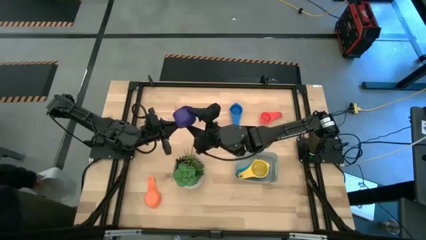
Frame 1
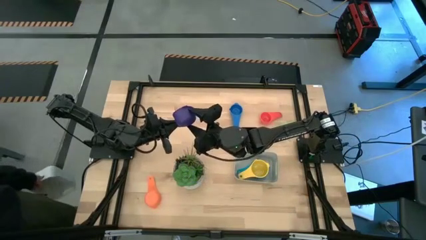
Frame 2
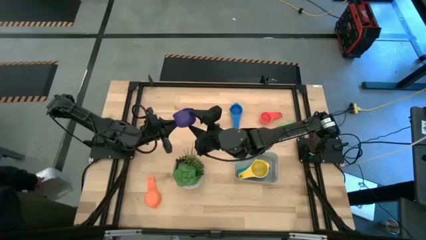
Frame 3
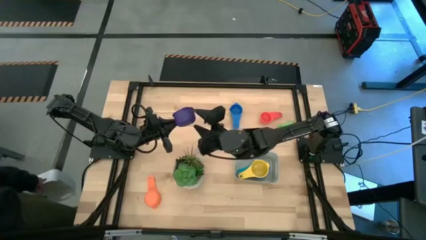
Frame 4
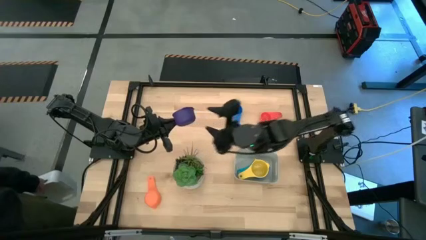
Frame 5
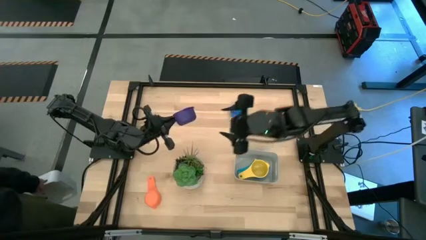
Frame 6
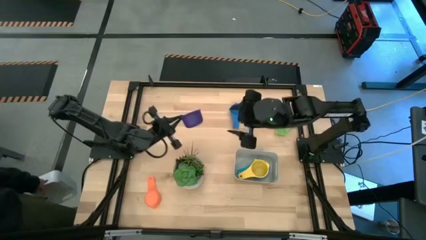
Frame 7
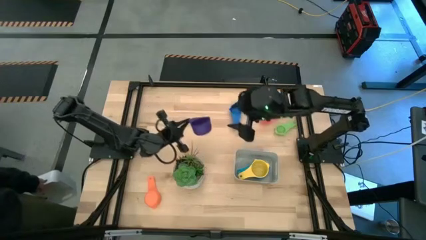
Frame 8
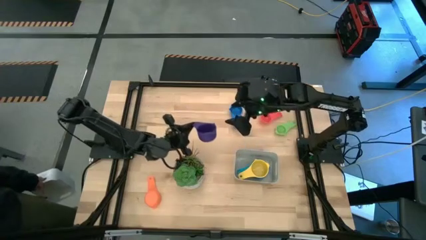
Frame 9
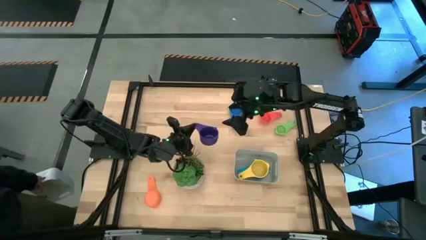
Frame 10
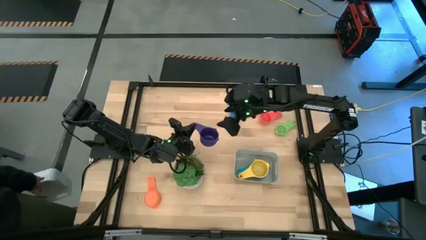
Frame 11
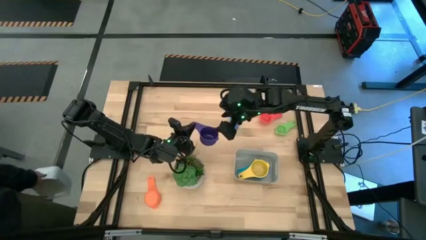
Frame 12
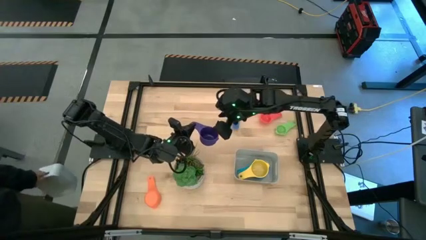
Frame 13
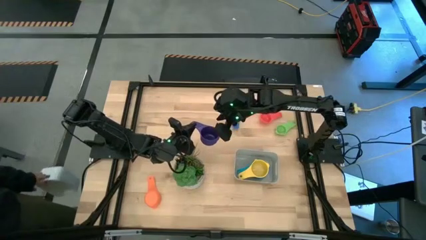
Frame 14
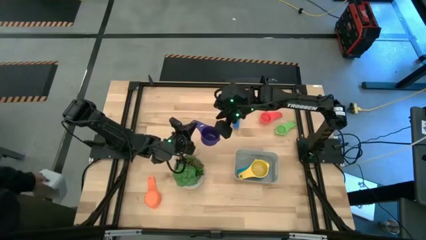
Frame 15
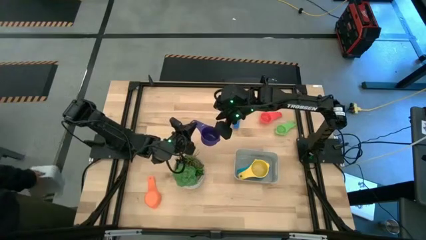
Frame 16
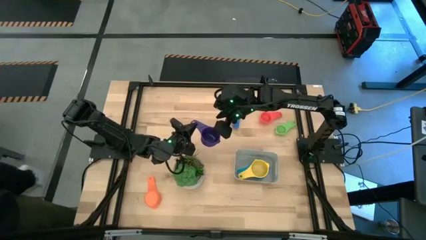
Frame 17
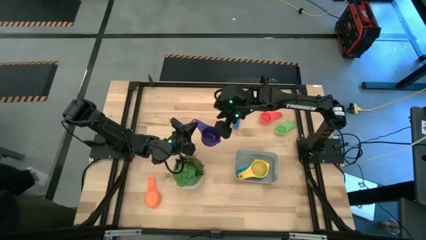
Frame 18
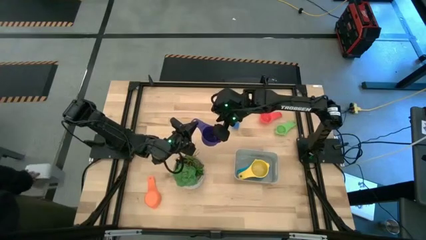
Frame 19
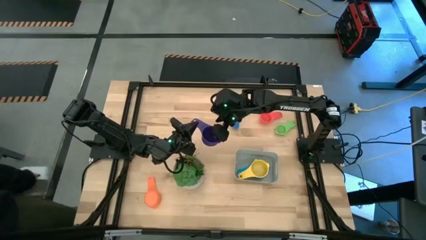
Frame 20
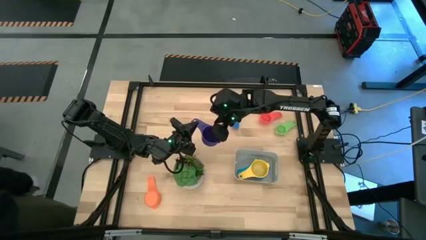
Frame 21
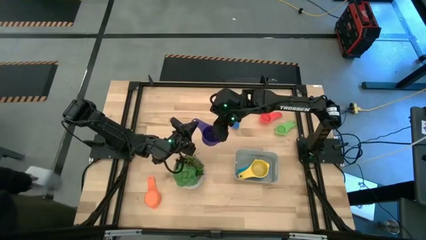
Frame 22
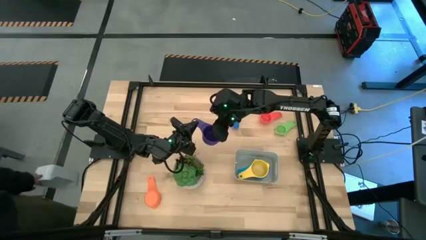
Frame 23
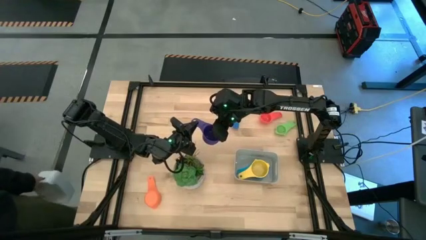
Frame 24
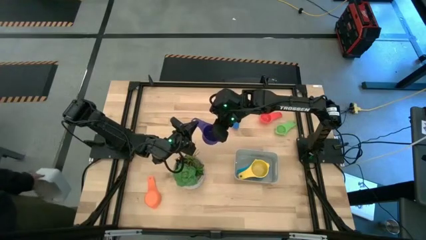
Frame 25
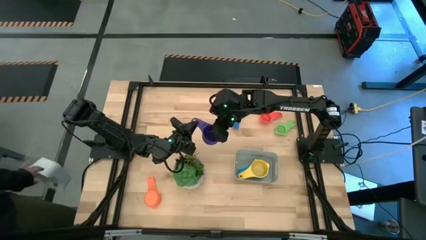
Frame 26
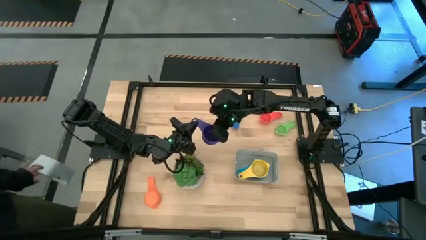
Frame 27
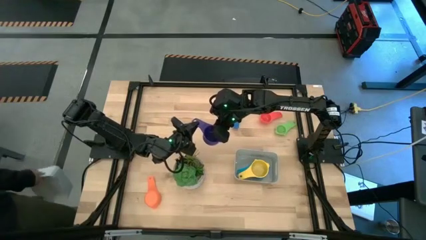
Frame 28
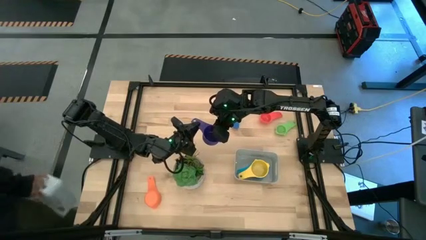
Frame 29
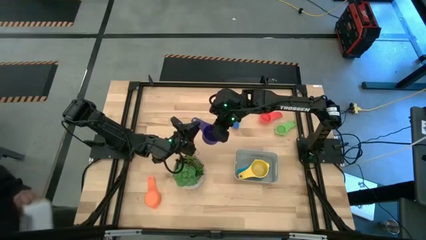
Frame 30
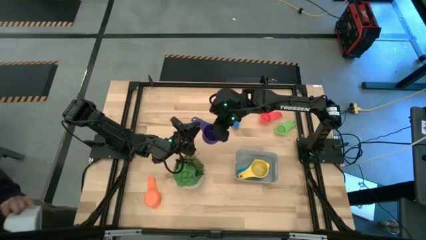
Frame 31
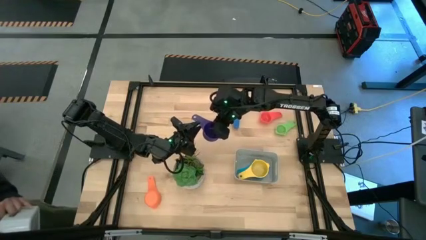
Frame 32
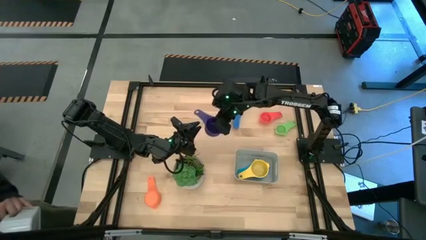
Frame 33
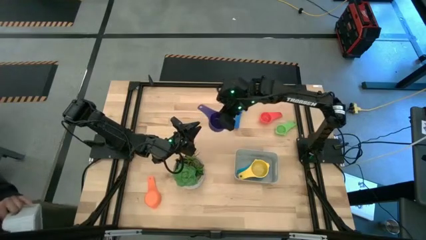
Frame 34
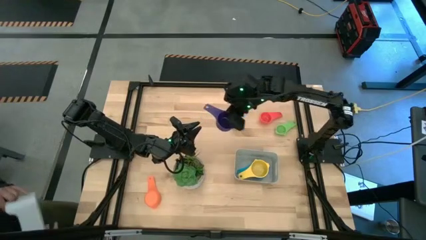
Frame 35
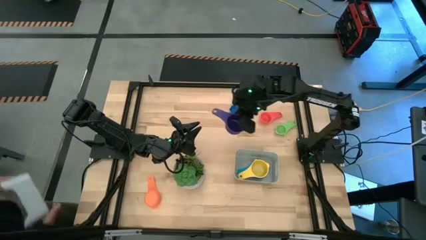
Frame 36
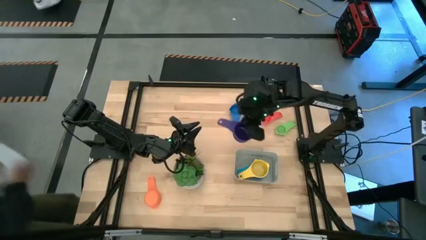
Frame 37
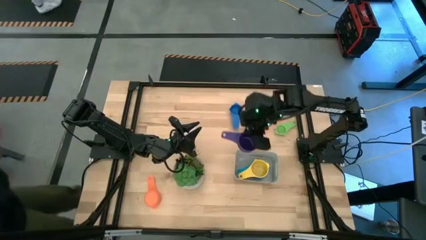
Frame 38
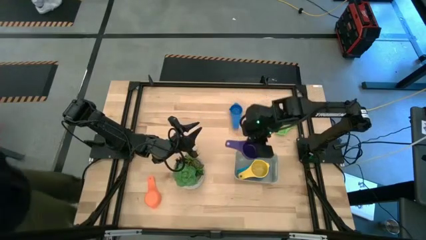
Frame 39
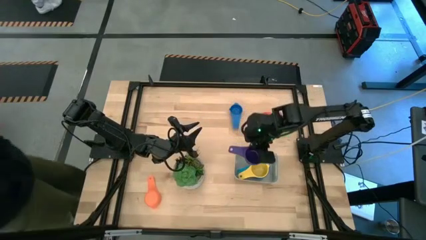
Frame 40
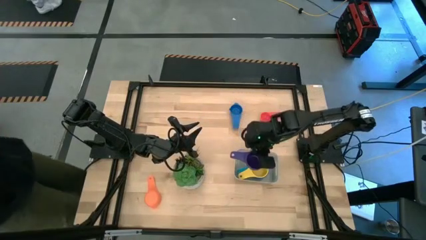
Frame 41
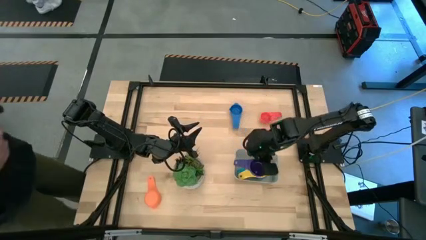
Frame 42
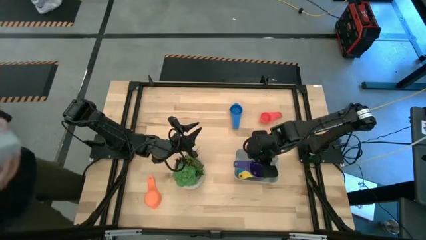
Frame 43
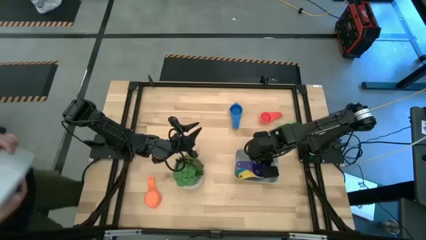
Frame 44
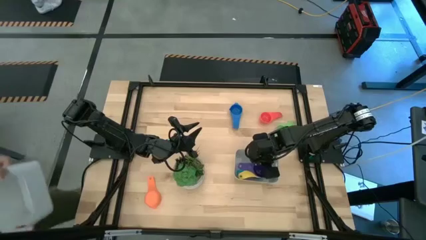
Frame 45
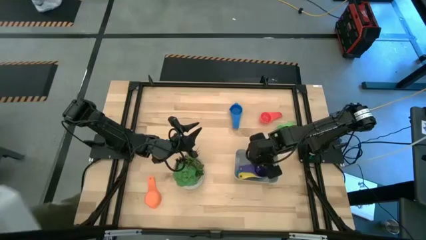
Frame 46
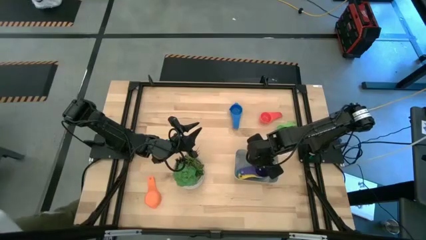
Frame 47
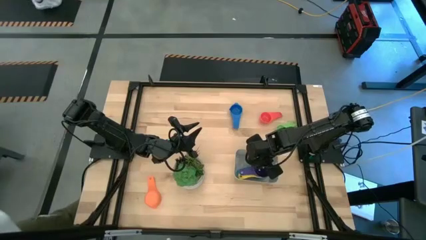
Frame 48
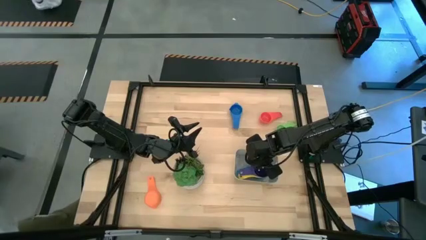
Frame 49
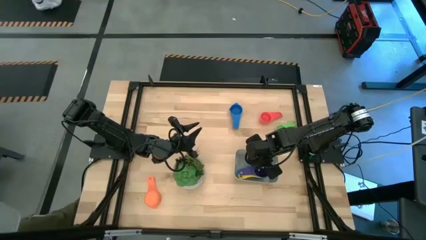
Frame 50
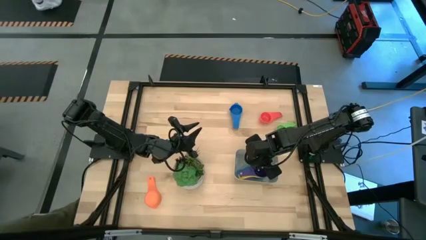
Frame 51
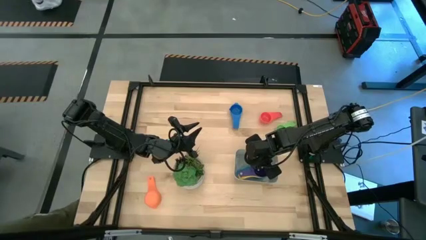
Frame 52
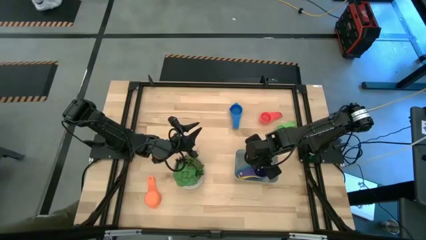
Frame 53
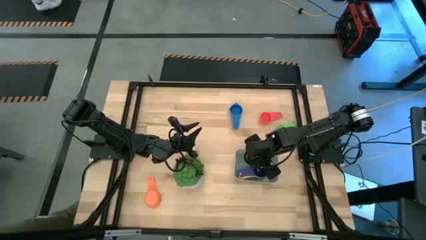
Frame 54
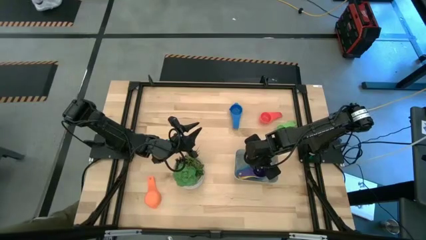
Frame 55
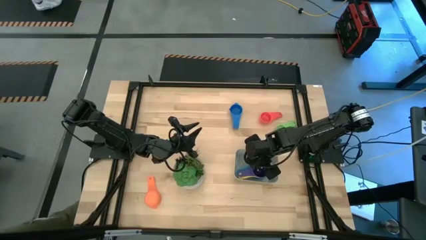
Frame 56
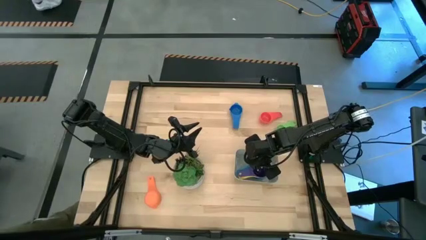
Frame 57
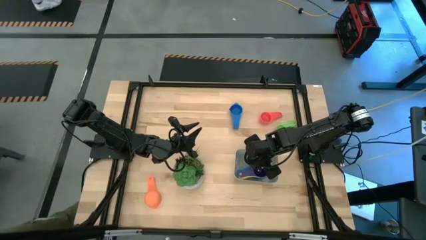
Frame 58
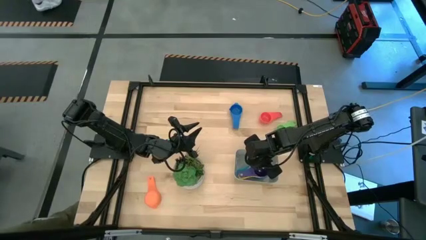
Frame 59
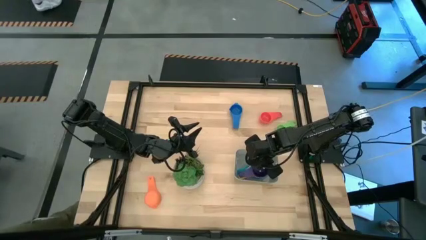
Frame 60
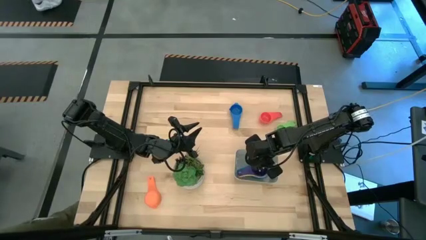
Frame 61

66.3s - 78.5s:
Task: Nest measuring cups in basket
Stack the violet measuring cup on top of the yellow measuring cup in the grey bin
